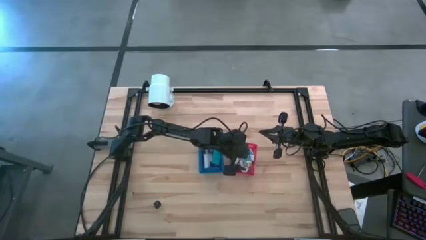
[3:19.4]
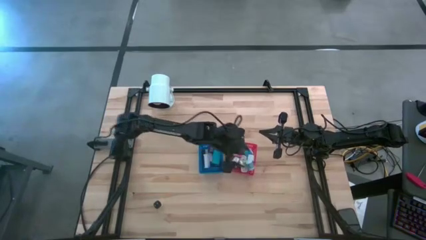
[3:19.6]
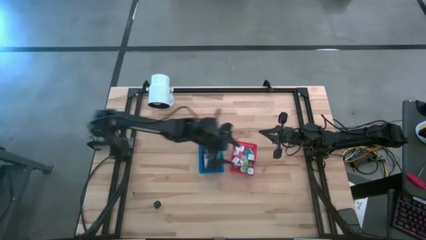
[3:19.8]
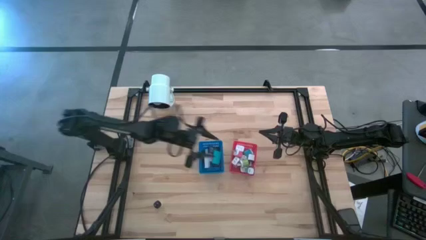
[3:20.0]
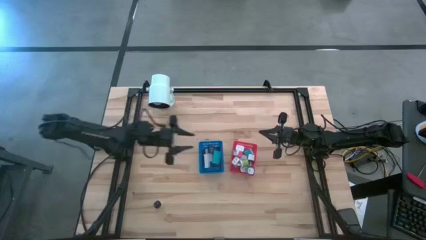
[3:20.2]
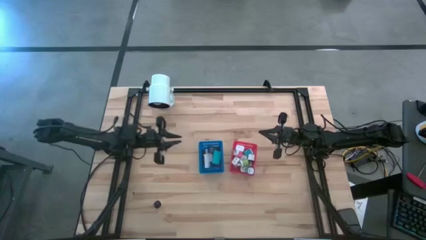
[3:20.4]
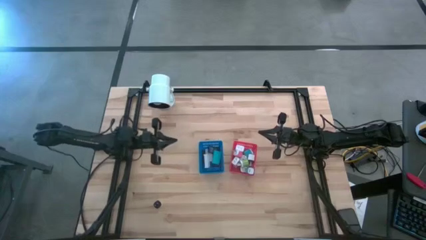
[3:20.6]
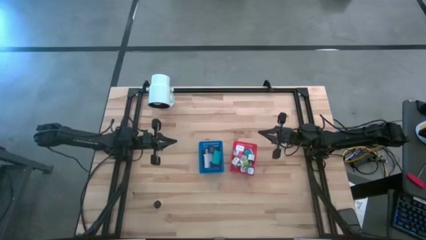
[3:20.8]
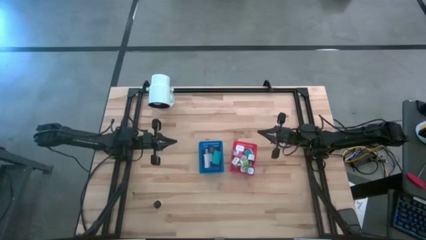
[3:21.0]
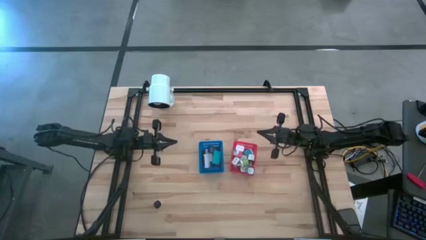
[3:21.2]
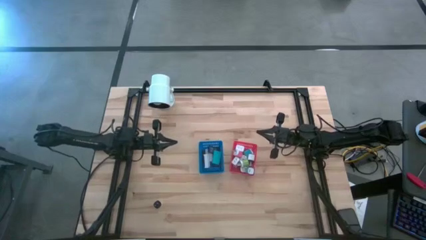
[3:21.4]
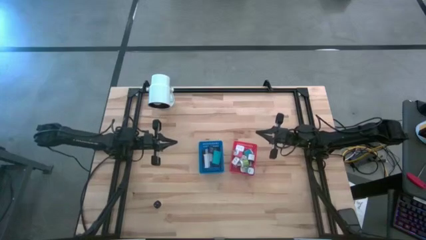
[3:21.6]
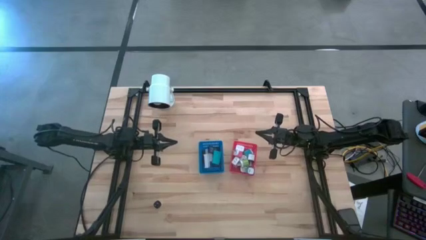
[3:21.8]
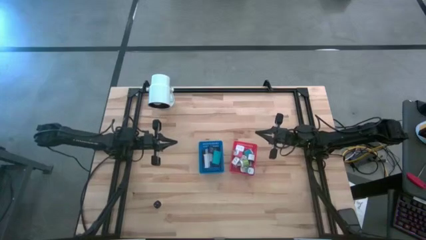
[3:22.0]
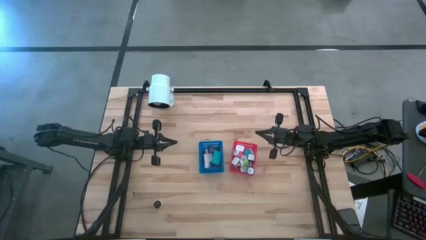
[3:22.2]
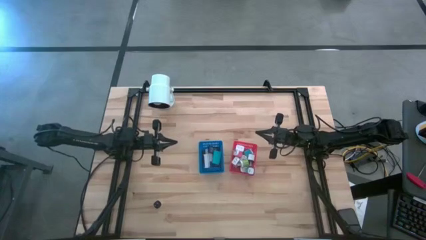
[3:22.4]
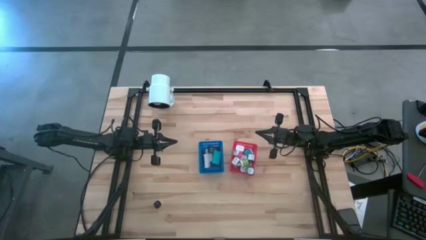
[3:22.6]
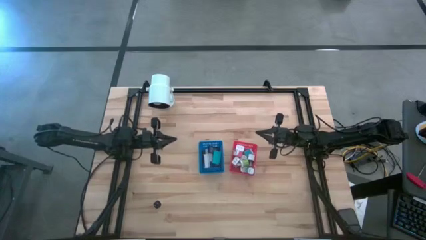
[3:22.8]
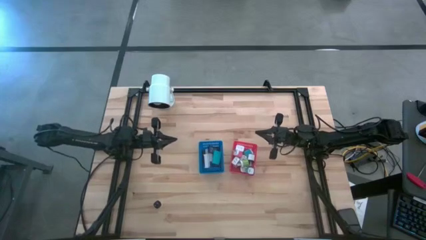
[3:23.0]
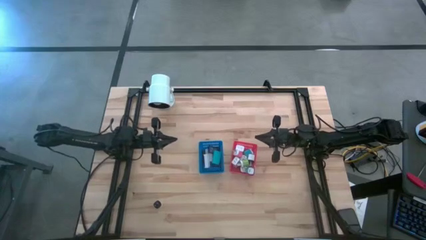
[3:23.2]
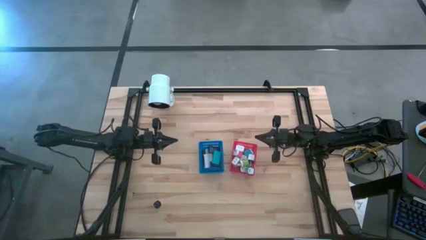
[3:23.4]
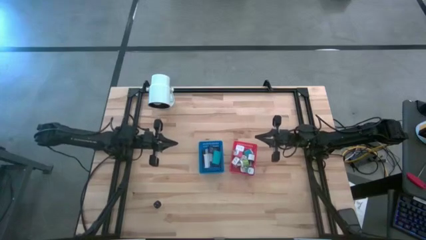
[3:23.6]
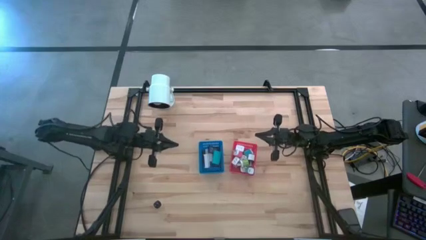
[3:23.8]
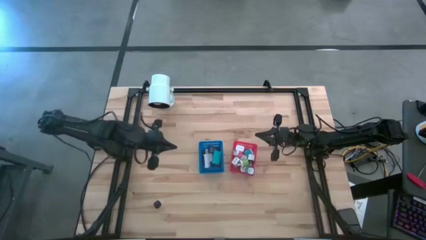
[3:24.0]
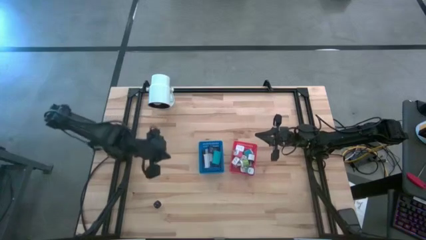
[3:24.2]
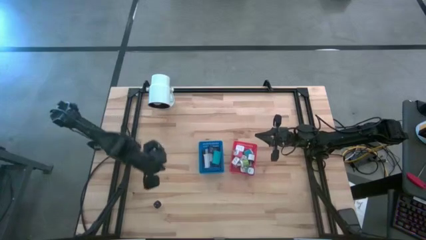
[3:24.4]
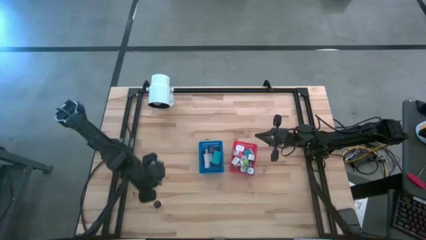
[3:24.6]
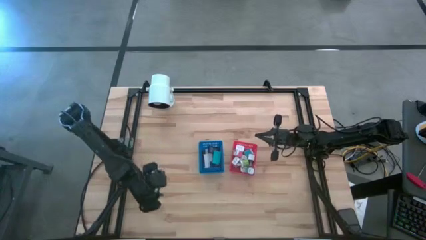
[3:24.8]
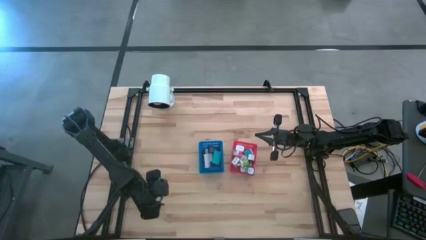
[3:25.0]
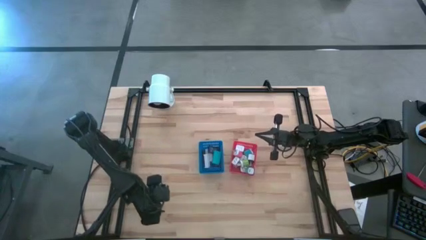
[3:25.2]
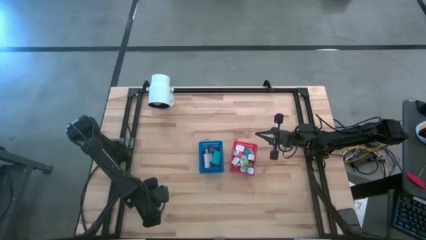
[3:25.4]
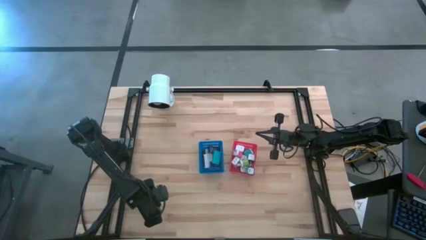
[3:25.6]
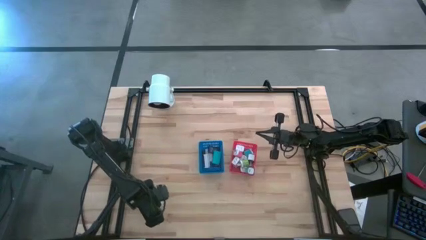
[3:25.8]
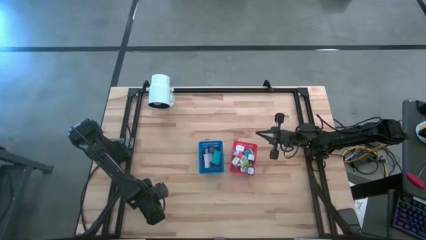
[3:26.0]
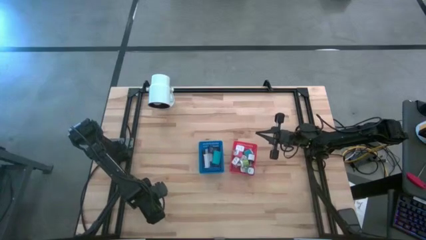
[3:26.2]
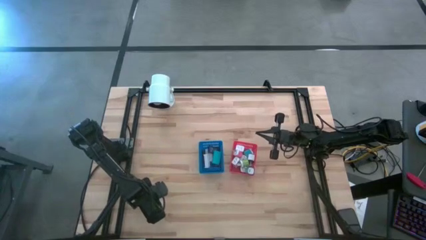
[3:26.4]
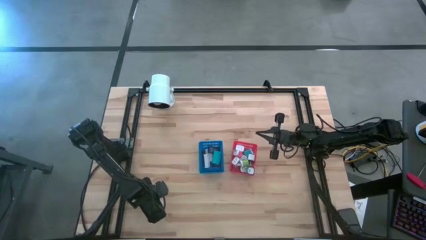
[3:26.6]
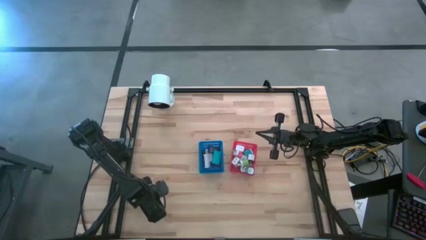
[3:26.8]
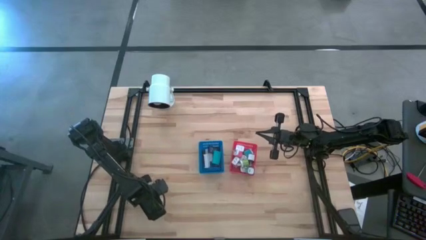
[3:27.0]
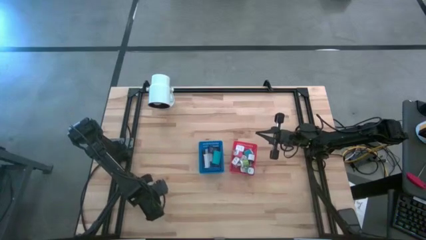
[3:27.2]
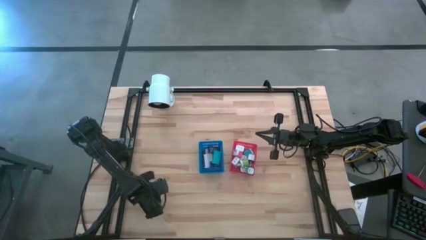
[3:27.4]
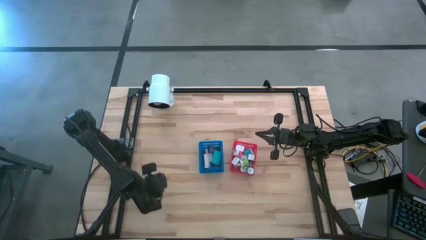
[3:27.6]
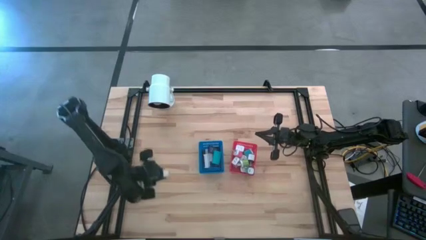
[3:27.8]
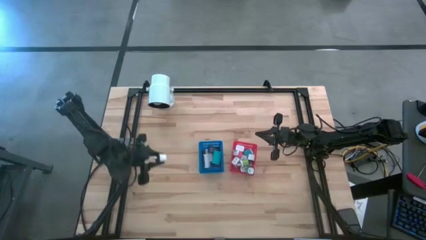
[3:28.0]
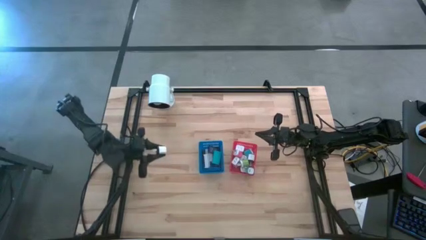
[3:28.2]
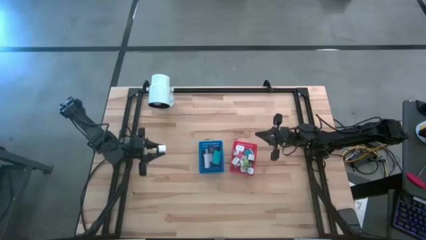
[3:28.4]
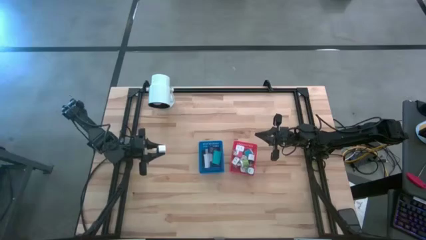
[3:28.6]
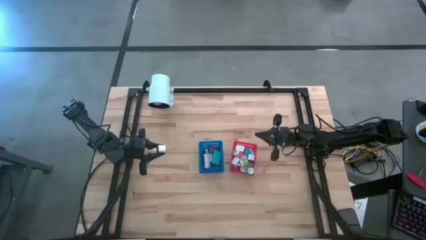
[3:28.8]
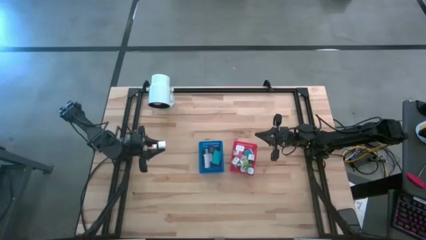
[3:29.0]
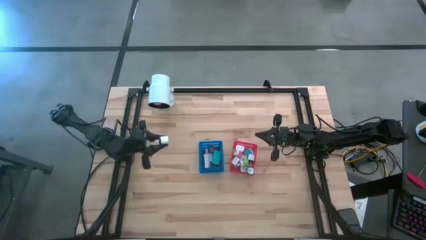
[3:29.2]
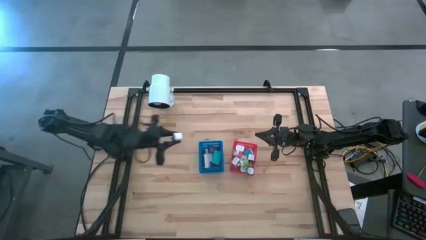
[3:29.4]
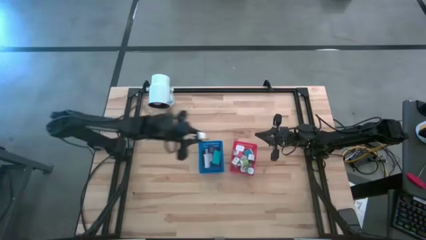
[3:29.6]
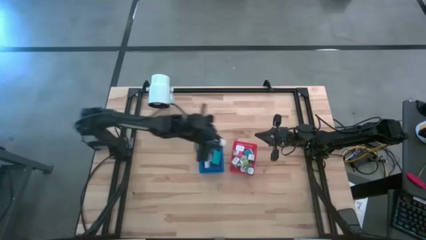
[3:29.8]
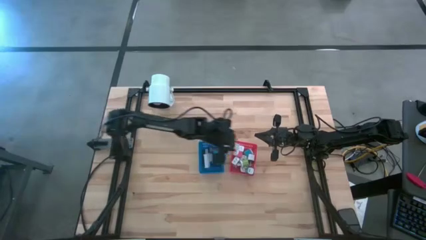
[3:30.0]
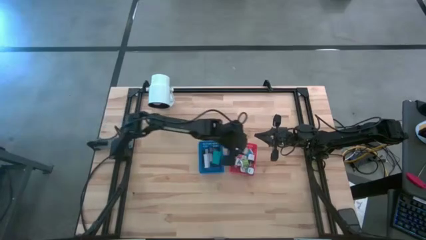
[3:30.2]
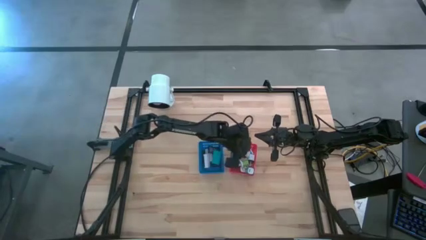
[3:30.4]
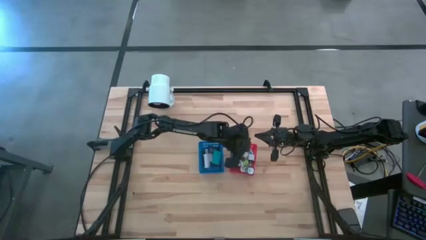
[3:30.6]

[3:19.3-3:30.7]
Task: Sort adapters and digital timers
Put the white charger adaptor into the red bin

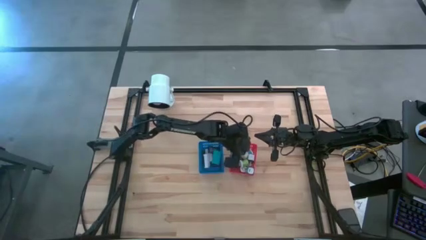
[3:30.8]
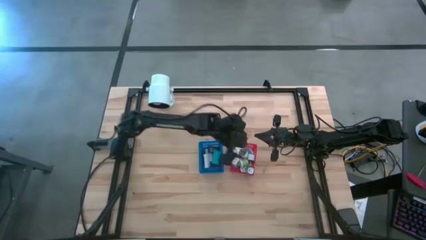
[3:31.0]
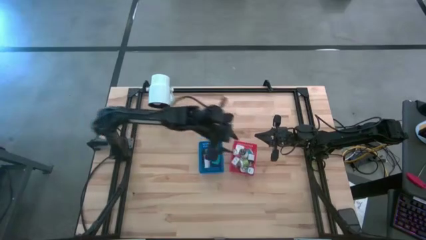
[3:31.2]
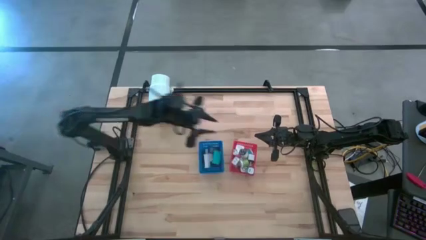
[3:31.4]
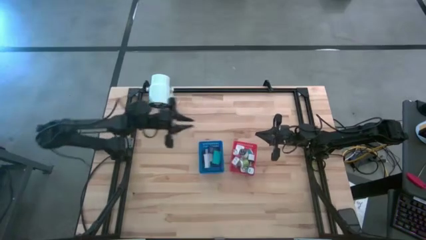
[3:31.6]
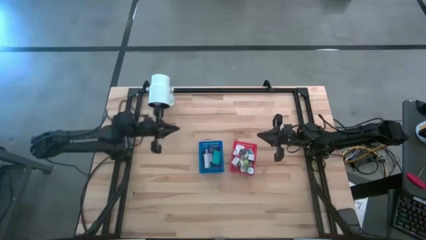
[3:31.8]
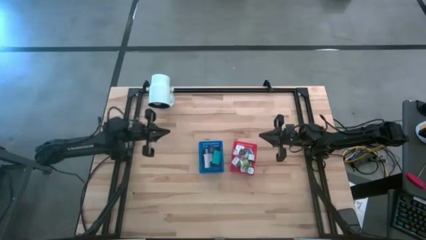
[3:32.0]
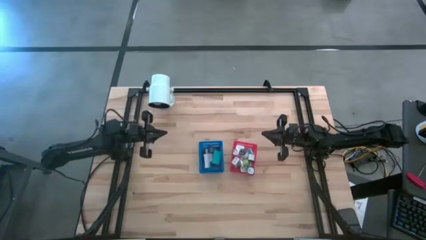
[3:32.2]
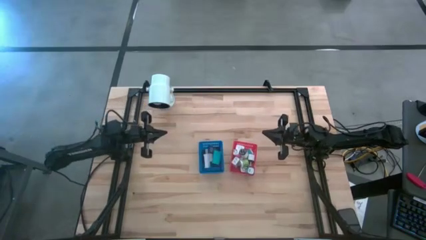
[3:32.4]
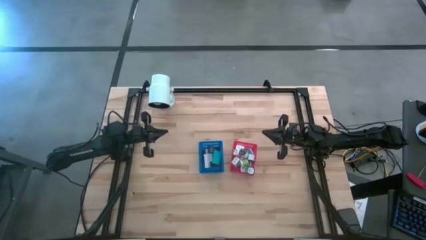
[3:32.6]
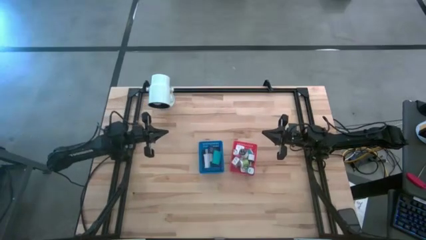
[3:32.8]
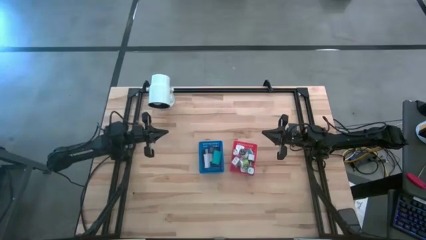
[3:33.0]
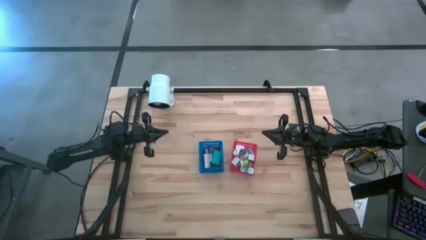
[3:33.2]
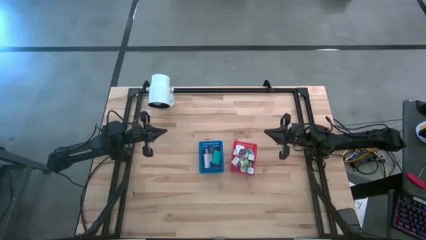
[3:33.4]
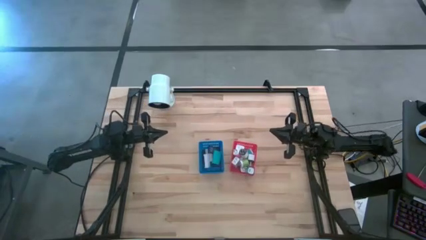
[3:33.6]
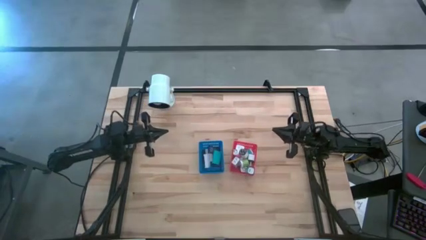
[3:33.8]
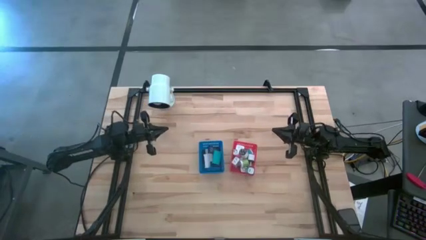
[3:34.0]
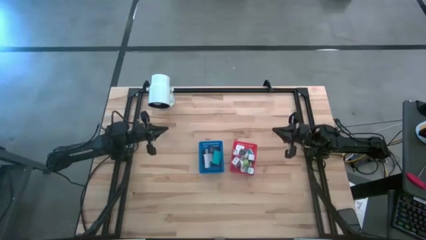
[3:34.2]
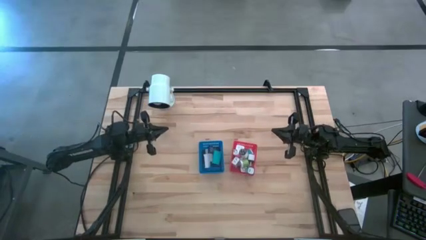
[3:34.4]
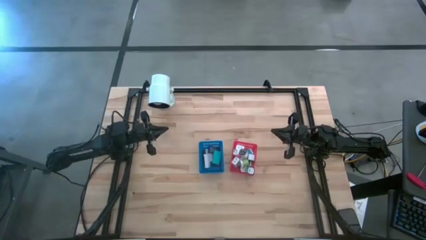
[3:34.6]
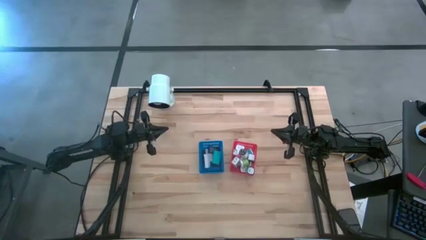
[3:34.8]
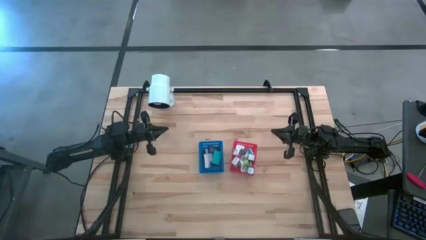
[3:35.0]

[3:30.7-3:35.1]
Return to Home Position

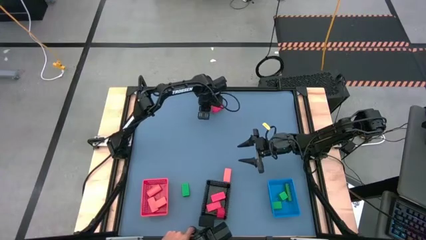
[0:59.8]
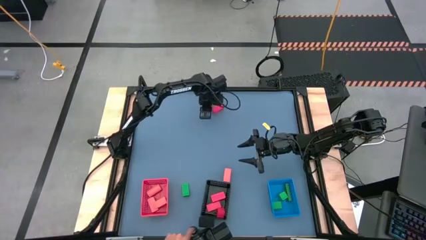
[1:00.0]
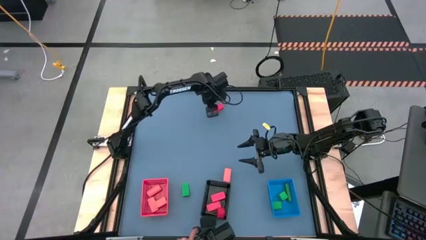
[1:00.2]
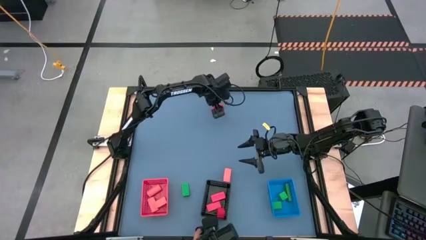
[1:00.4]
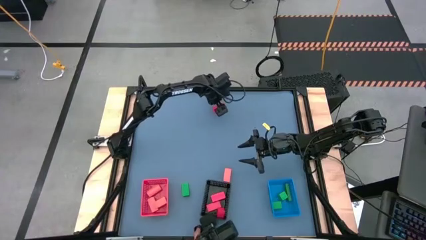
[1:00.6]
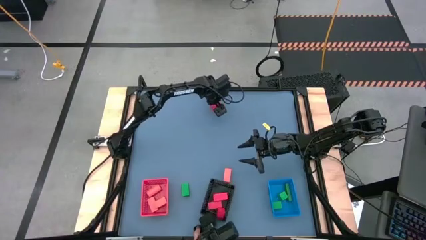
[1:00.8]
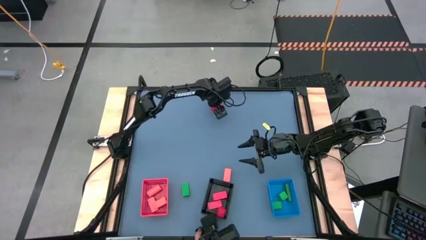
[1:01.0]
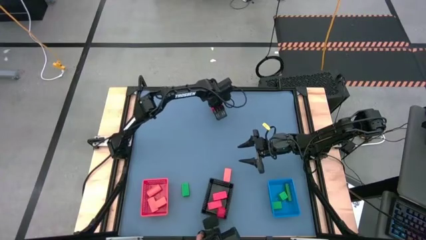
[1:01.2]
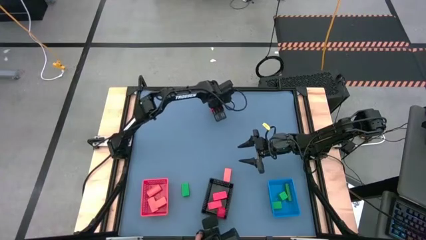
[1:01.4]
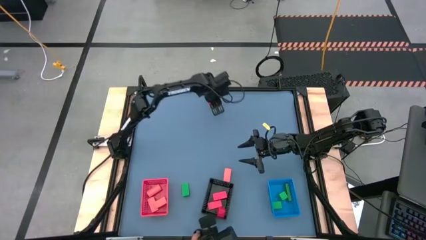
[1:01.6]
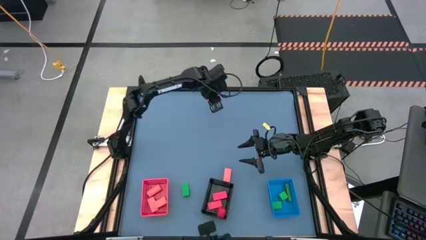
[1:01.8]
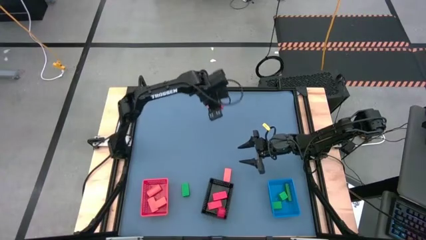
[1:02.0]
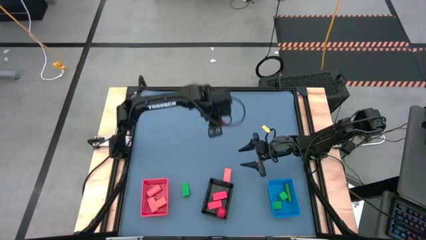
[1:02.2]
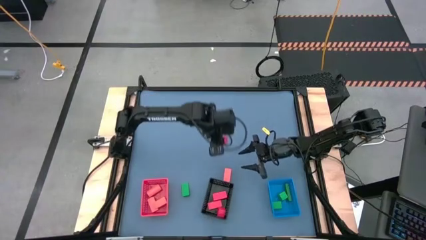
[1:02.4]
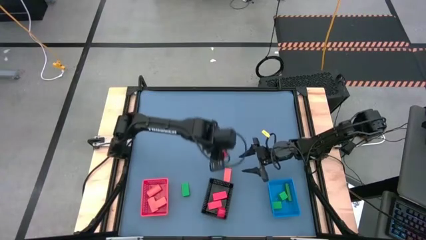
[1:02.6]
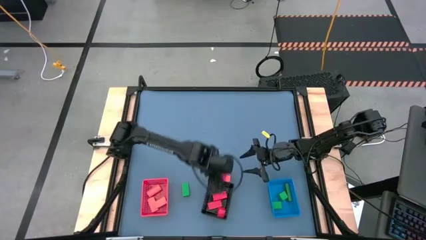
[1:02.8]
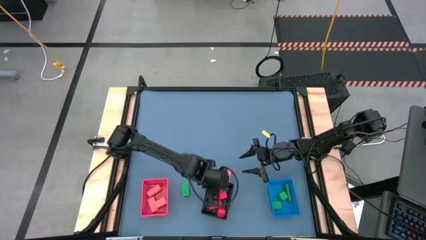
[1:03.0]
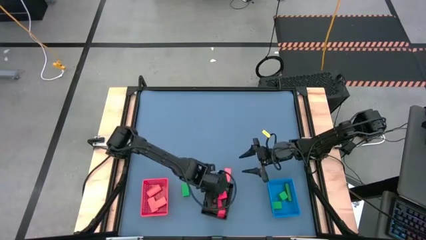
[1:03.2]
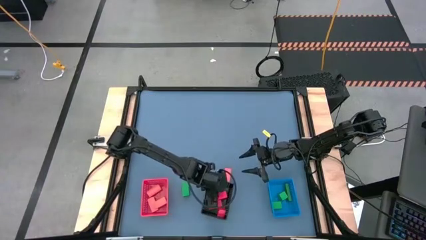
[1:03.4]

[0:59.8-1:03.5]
Task: Sort & place blocks by color
Put the red block into the black bin
